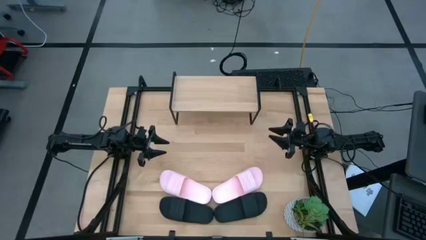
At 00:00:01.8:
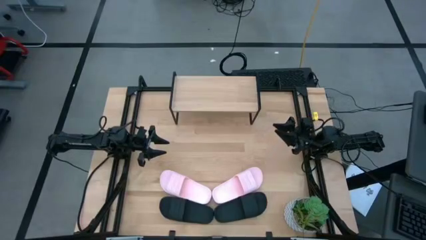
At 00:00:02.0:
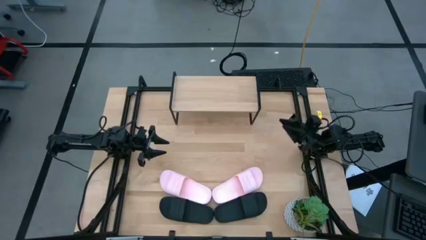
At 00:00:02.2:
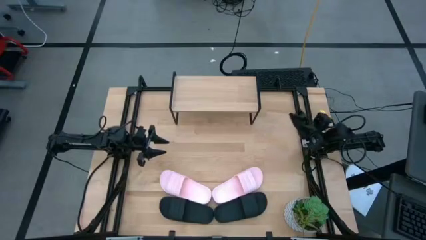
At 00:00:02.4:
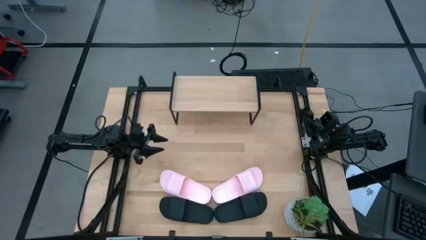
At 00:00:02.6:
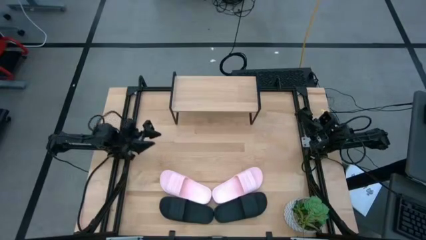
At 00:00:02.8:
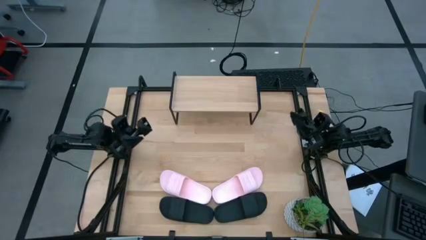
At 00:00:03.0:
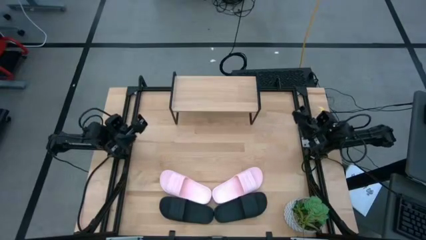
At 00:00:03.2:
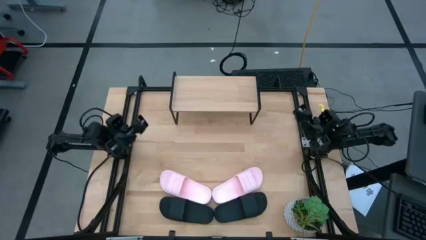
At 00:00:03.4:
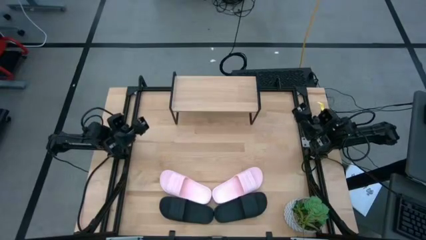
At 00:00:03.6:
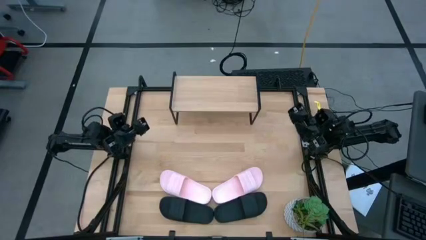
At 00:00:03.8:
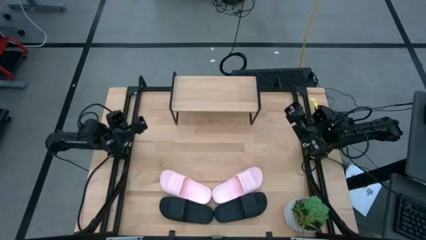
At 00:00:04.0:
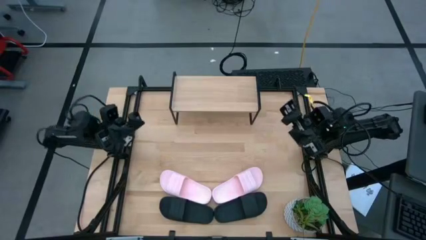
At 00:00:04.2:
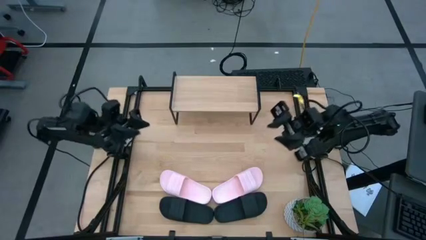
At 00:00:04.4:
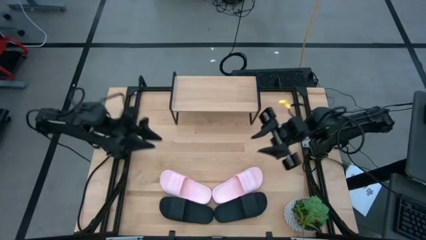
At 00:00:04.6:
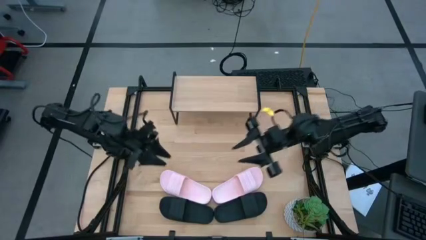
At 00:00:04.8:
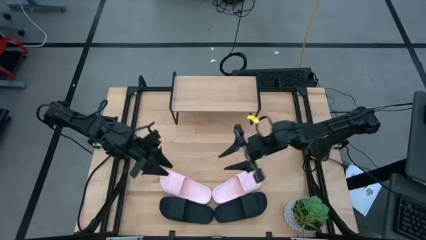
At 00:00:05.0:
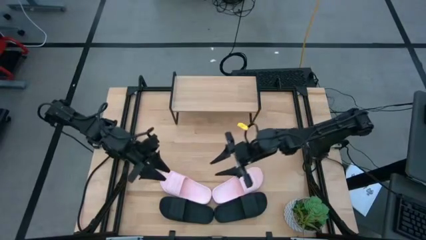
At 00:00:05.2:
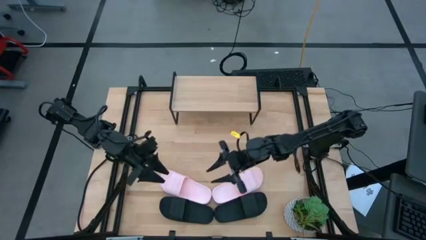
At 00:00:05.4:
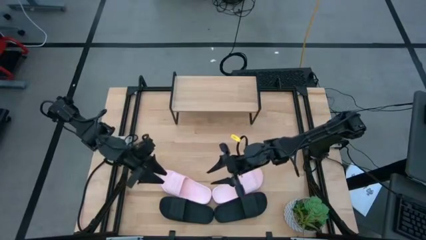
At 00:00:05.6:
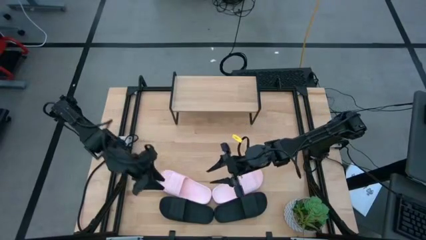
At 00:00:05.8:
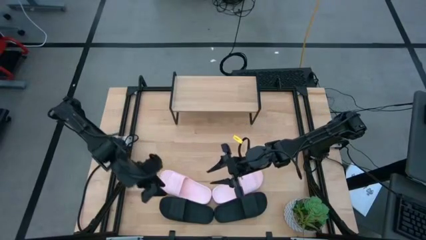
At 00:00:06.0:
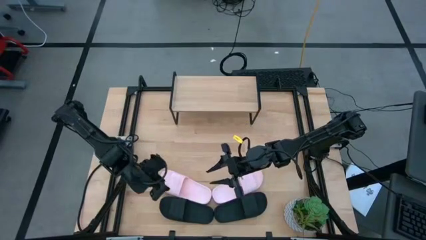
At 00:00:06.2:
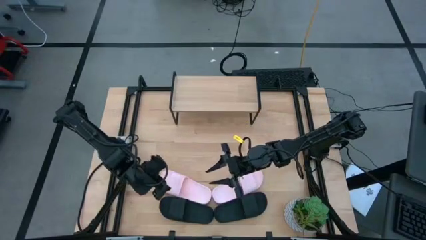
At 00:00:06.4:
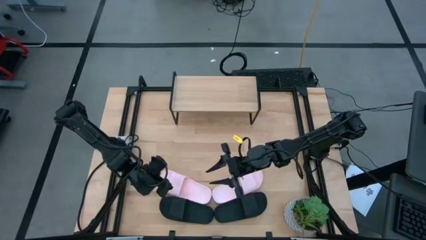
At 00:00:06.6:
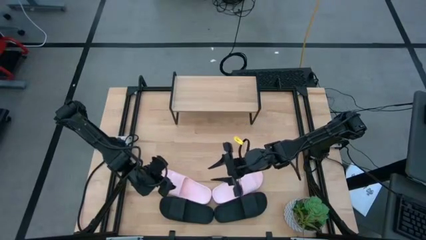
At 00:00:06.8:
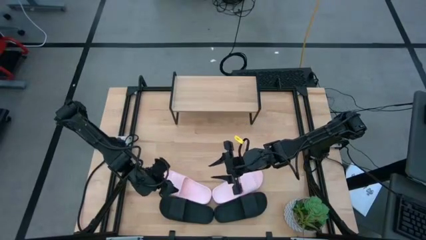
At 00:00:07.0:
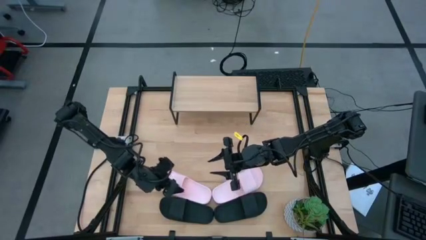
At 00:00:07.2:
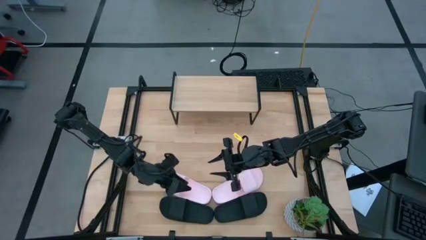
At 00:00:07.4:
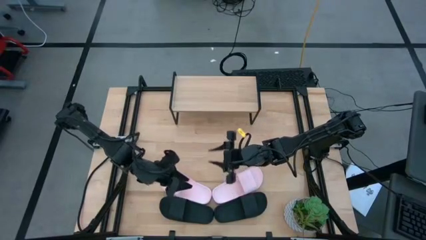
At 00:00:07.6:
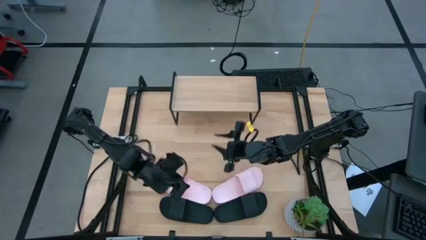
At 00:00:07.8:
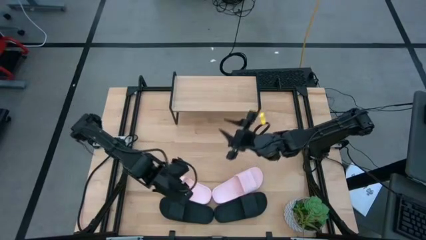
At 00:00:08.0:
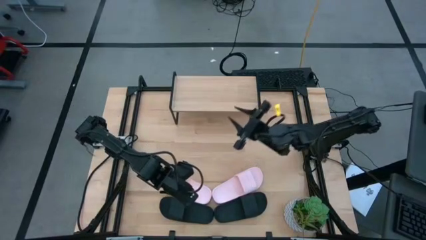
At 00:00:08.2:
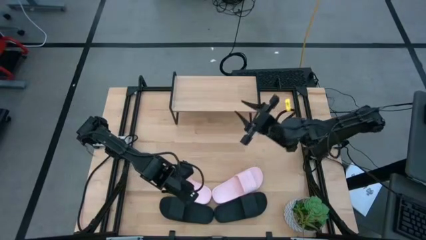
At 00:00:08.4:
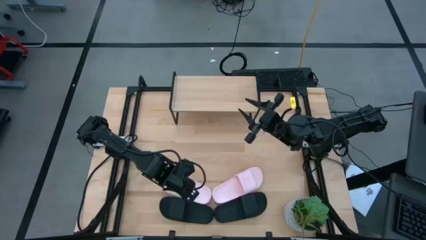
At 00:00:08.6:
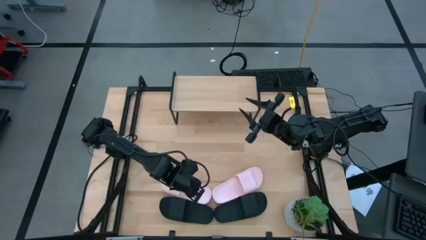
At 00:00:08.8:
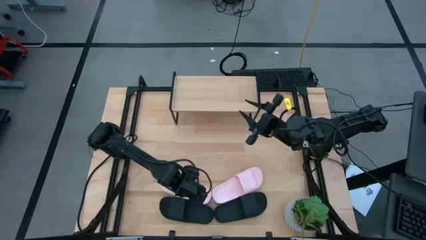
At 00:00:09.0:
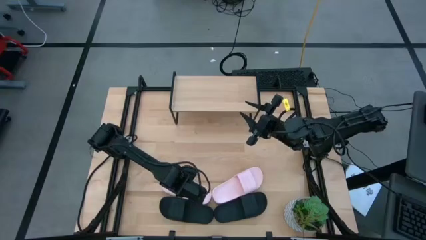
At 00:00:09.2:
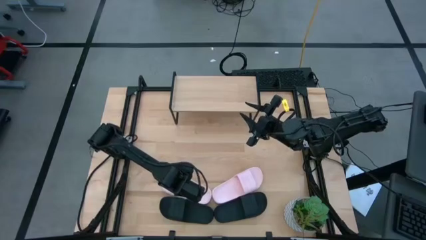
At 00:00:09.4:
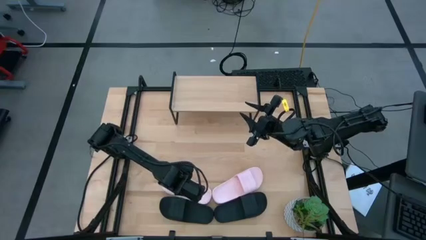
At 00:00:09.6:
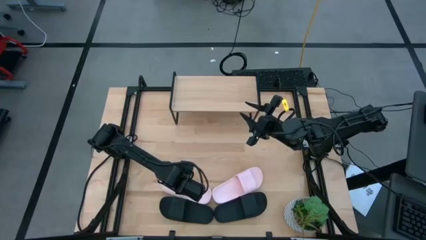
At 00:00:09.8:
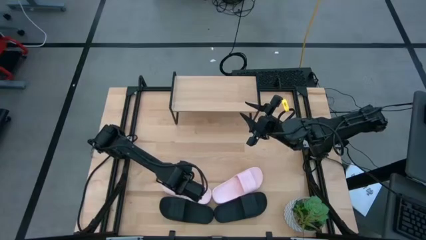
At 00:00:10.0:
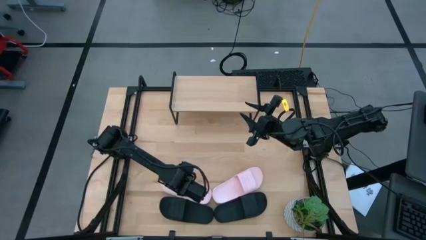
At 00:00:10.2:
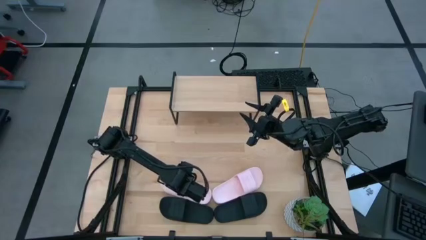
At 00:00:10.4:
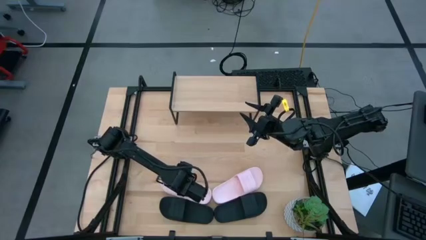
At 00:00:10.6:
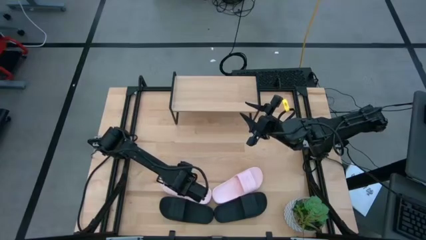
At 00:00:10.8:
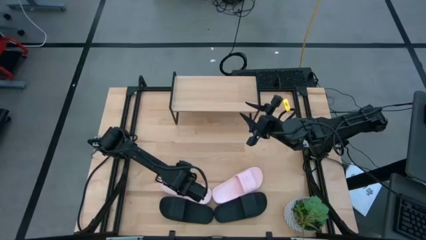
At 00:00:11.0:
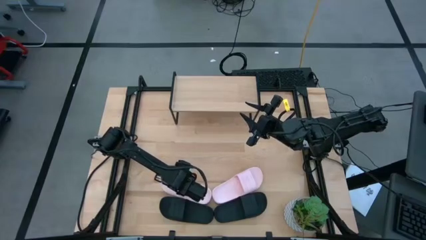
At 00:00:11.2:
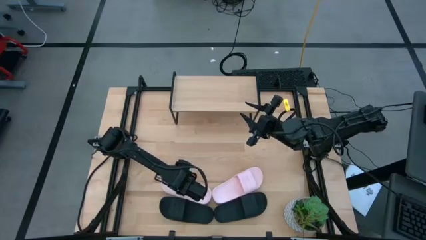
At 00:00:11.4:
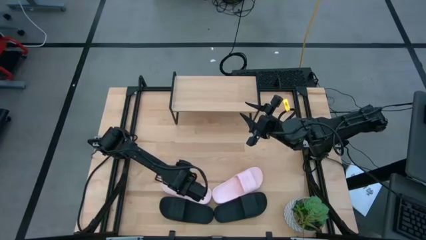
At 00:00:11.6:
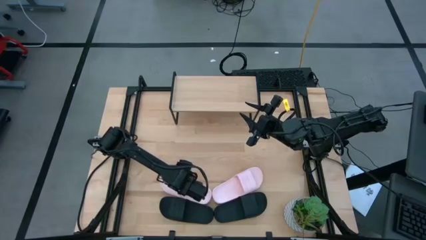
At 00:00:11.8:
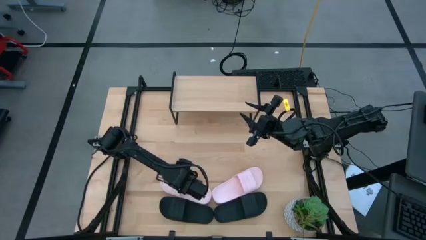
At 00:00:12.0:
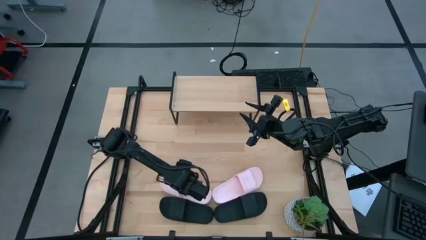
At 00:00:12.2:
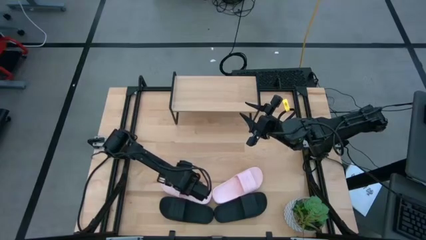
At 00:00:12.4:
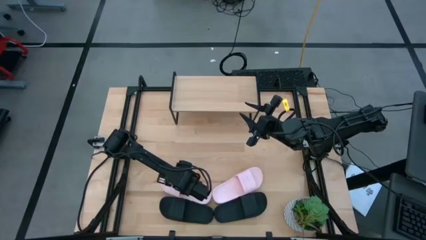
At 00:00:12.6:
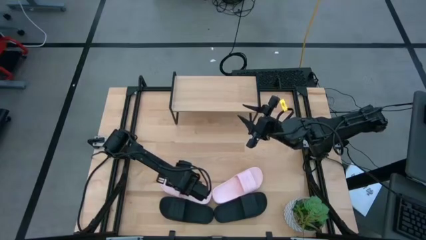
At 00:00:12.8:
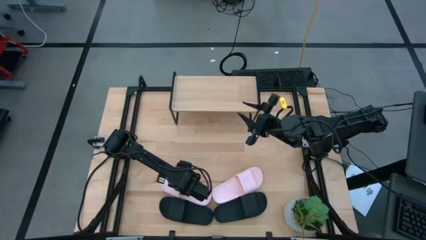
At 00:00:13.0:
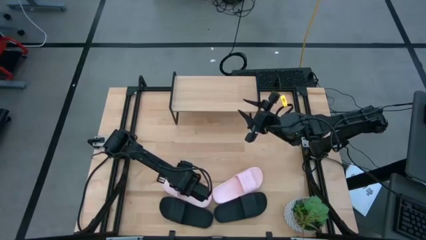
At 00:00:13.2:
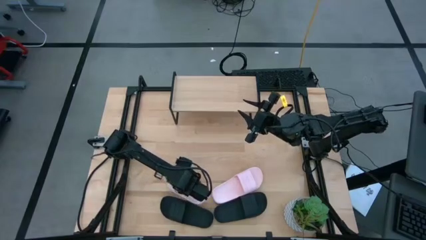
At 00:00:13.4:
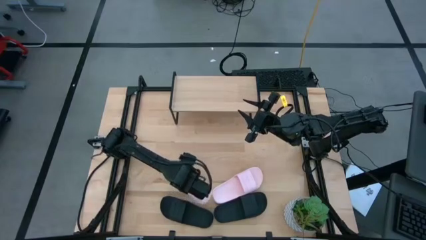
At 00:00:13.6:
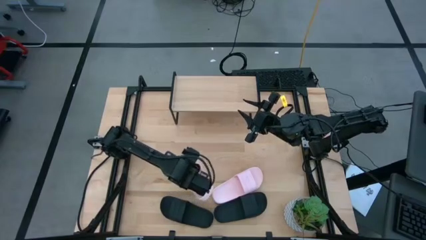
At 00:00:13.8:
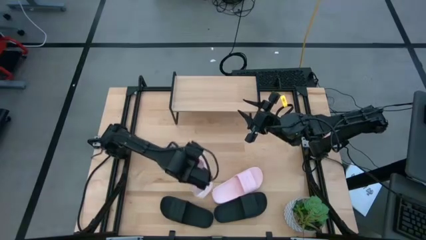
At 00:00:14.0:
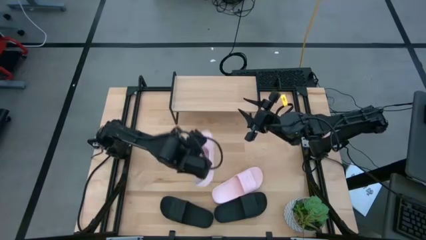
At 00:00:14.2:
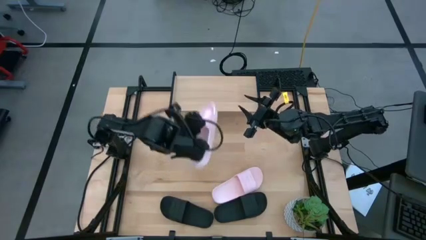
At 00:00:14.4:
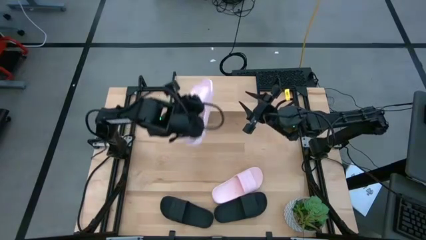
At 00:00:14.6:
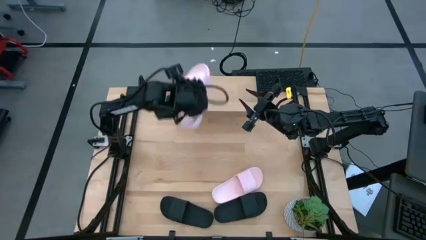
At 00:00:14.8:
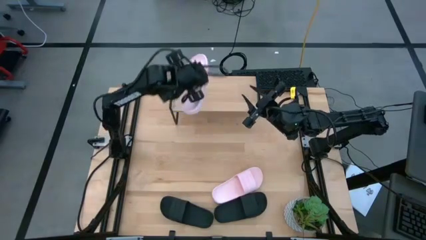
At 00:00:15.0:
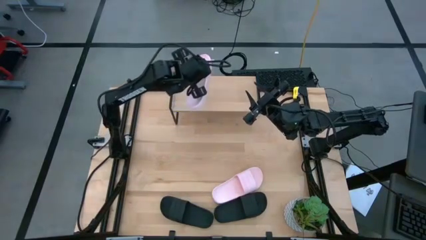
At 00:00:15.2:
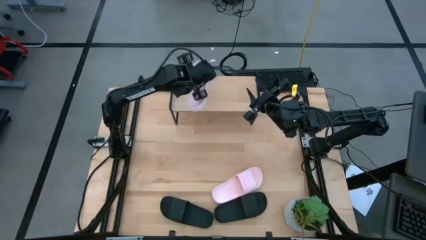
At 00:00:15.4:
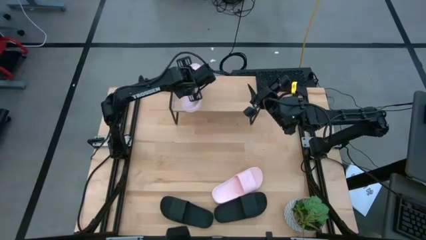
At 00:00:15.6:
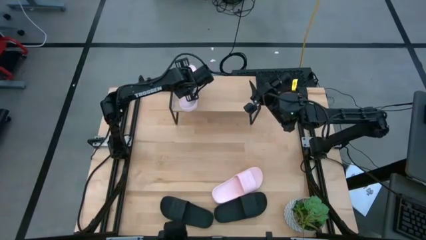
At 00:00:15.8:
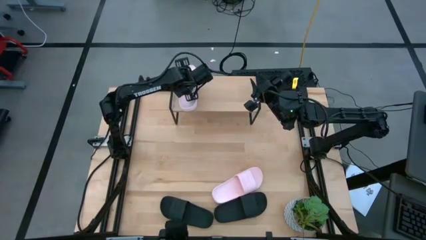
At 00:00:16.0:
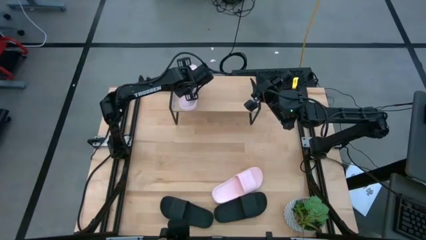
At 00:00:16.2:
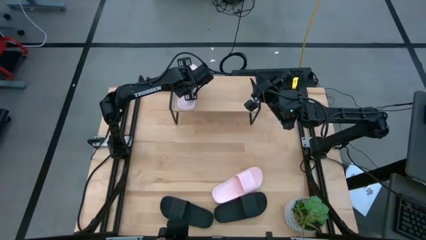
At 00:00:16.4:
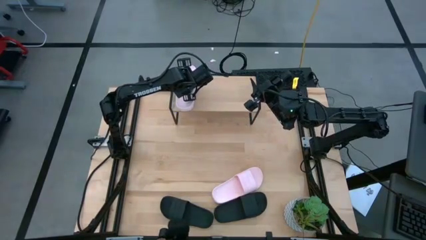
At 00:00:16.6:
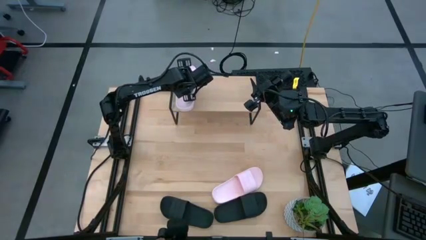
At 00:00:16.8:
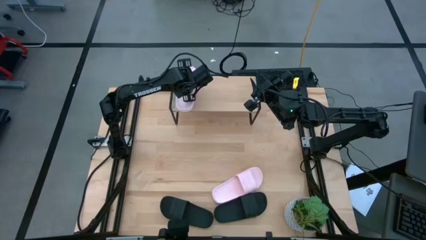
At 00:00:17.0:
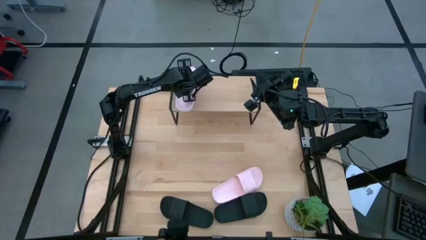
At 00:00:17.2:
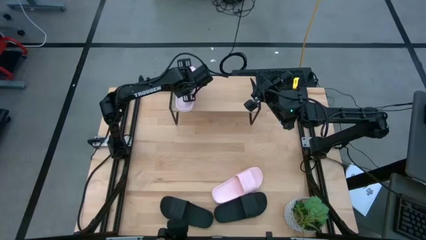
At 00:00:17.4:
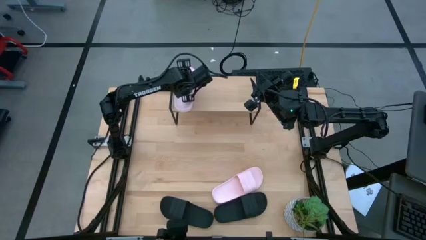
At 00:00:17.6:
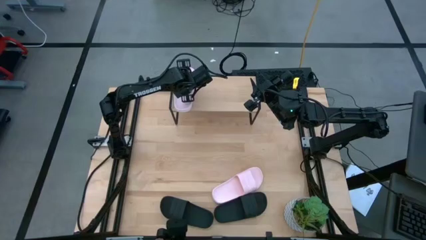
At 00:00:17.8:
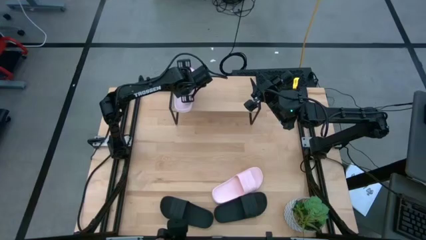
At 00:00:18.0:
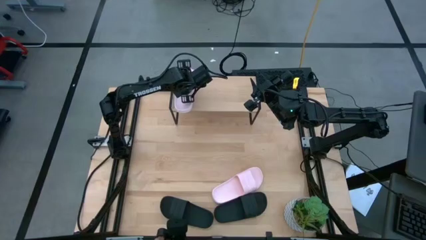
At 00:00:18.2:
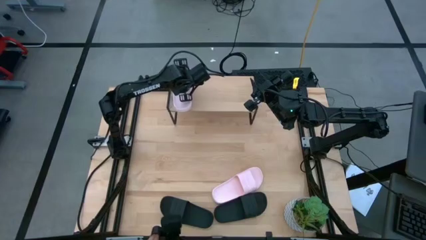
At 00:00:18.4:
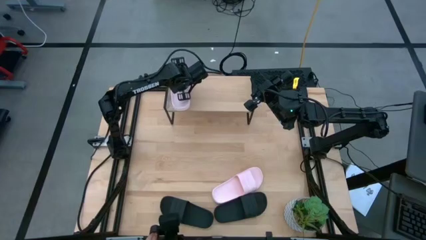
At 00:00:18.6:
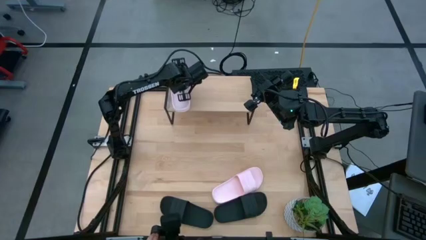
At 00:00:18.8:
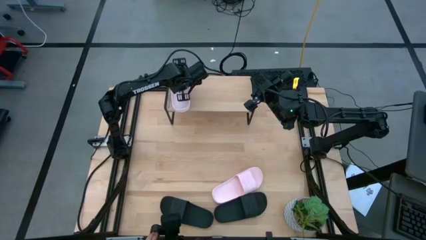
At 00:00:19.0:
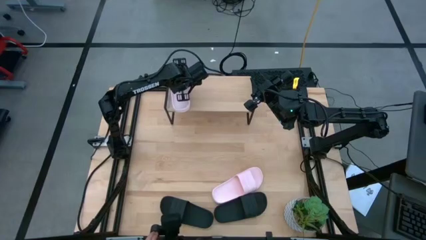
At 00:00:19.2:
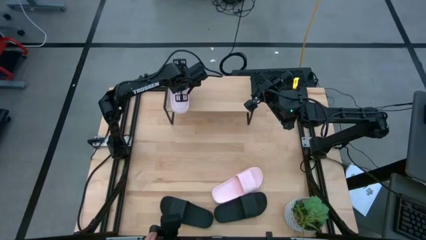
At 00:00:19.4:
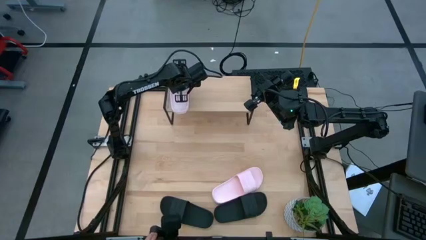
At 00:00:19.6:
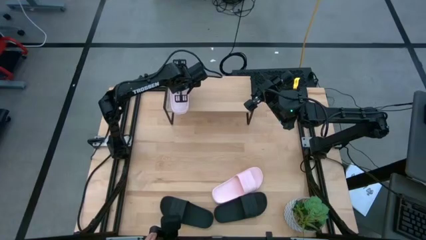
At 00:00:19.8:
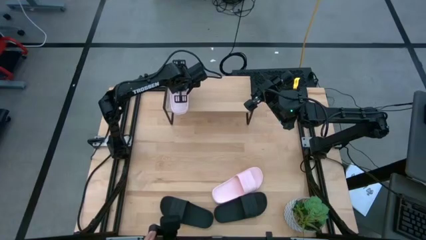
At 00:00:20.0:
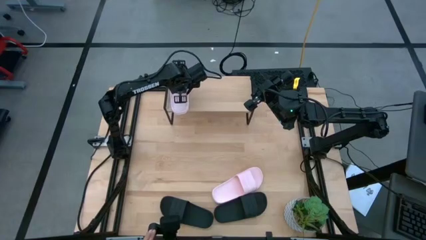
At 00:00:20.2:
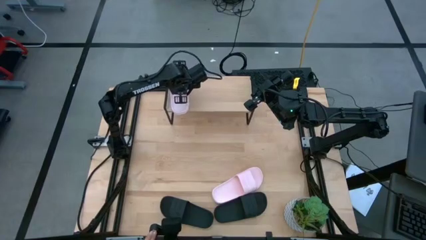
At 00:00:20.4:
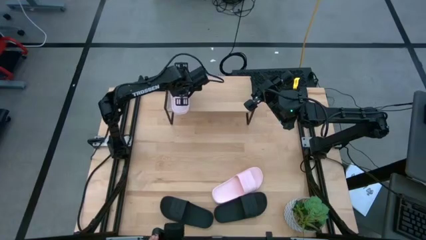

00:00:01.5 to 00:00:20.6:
Task: Pick and place slides into the shelf
Put the left pink slide on the shelf
